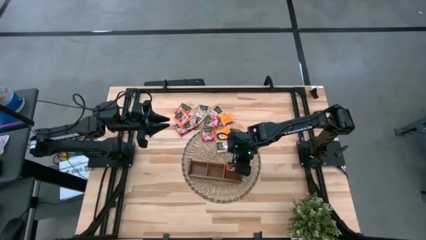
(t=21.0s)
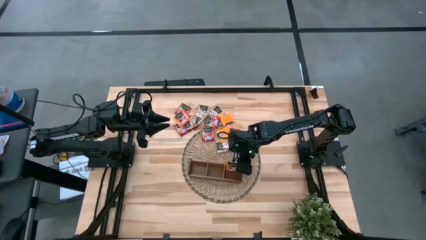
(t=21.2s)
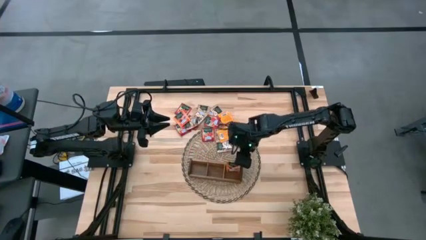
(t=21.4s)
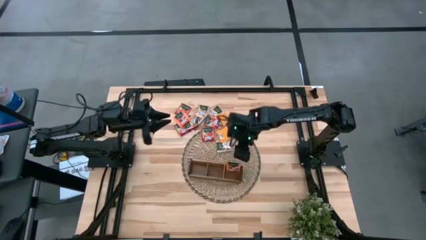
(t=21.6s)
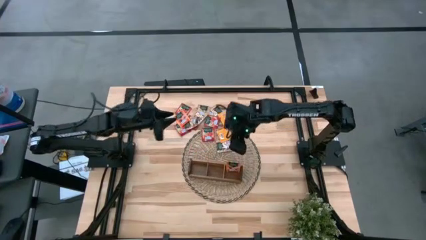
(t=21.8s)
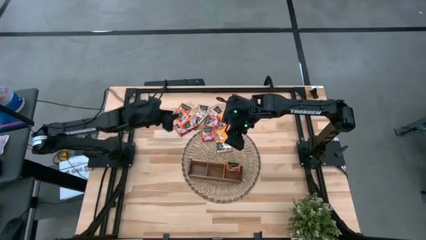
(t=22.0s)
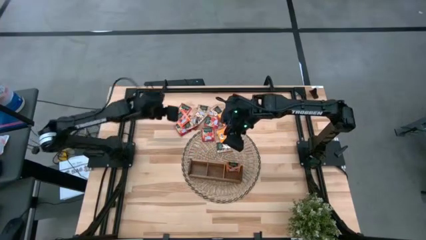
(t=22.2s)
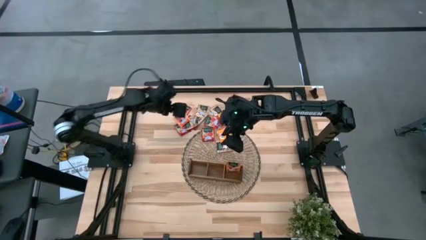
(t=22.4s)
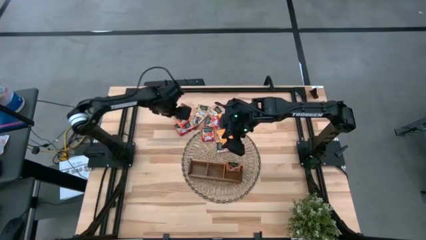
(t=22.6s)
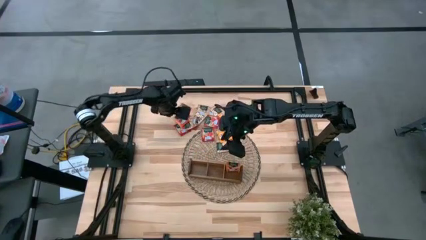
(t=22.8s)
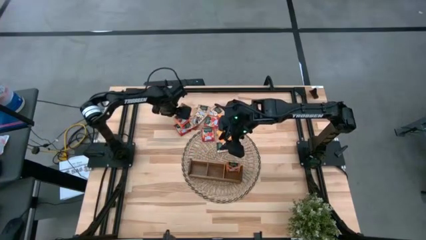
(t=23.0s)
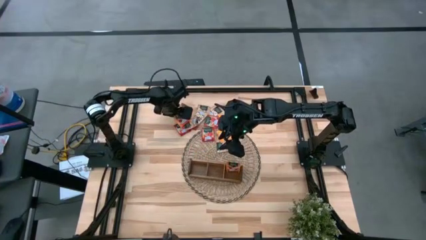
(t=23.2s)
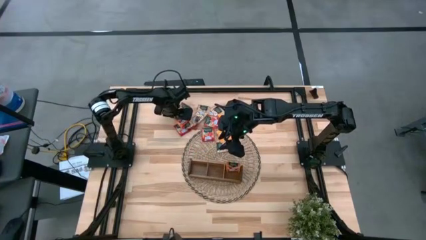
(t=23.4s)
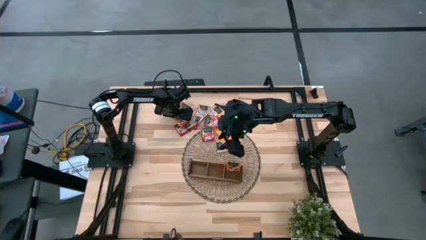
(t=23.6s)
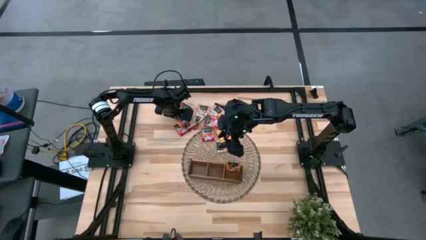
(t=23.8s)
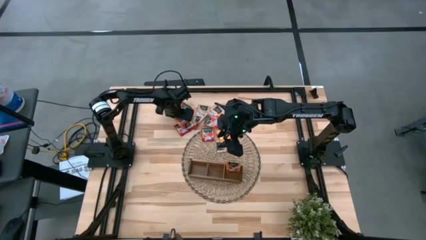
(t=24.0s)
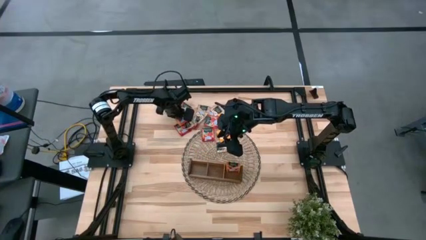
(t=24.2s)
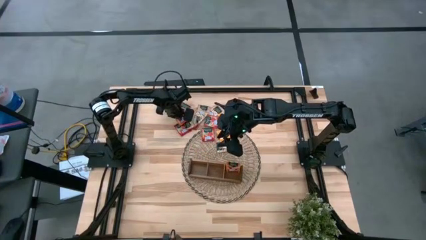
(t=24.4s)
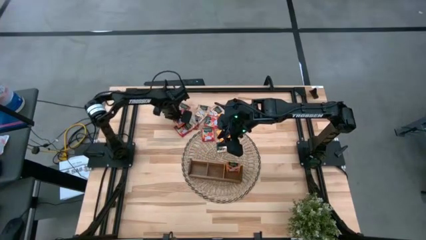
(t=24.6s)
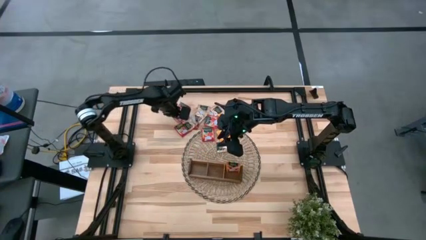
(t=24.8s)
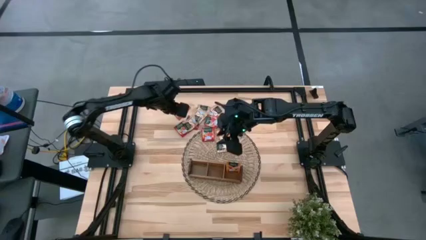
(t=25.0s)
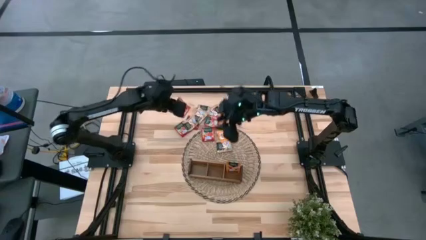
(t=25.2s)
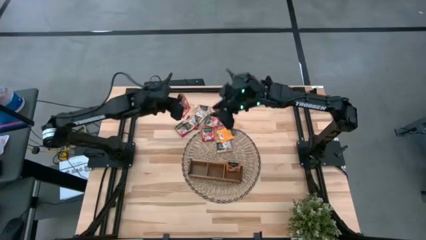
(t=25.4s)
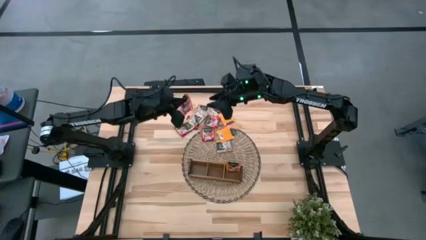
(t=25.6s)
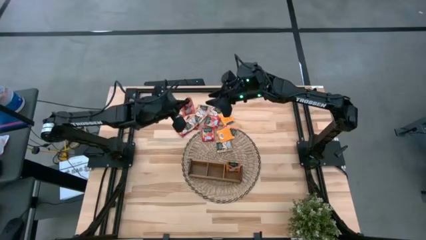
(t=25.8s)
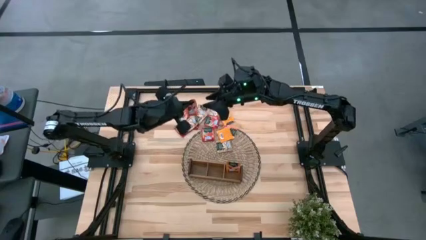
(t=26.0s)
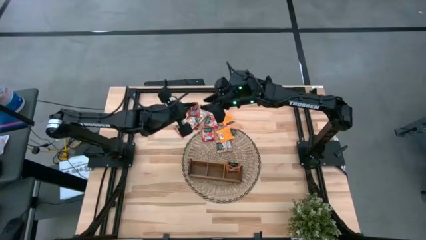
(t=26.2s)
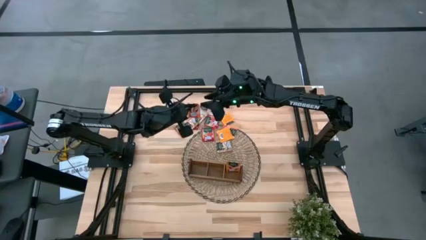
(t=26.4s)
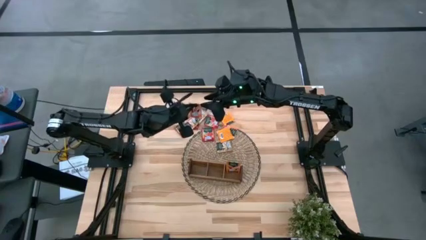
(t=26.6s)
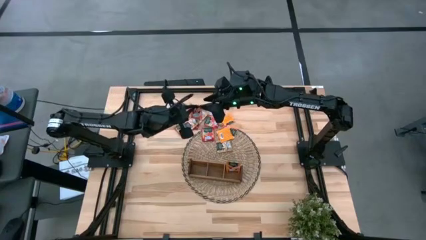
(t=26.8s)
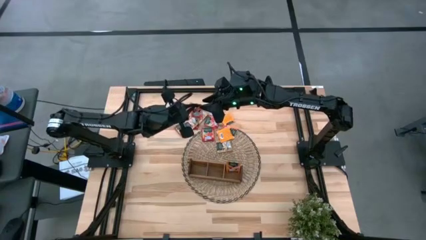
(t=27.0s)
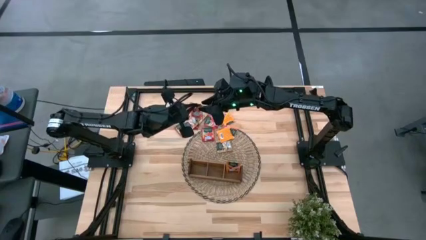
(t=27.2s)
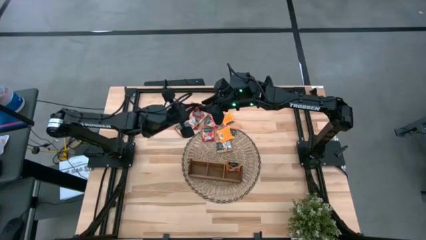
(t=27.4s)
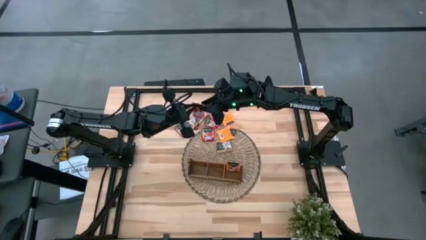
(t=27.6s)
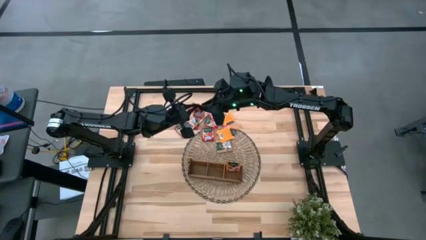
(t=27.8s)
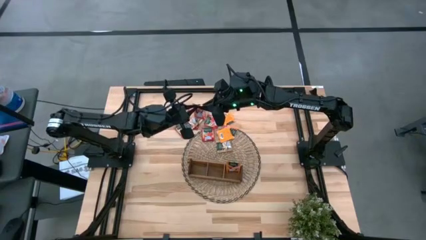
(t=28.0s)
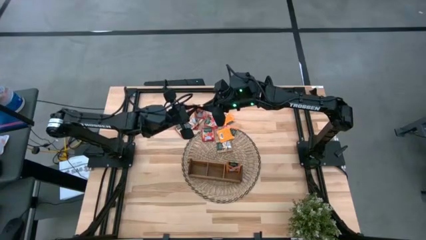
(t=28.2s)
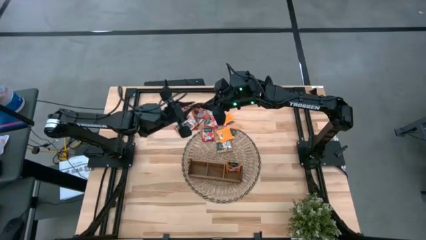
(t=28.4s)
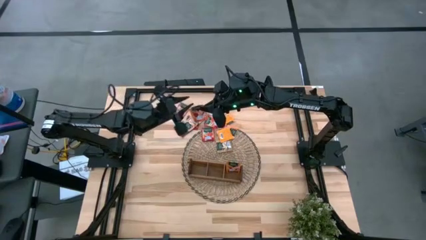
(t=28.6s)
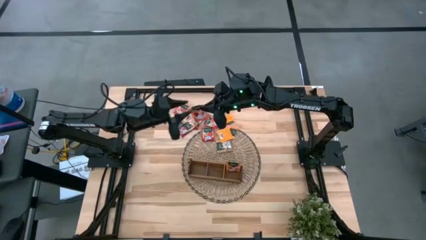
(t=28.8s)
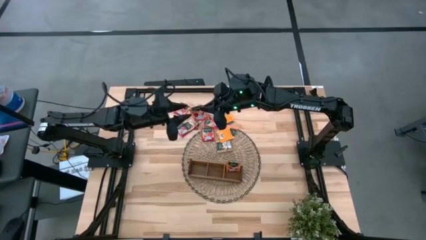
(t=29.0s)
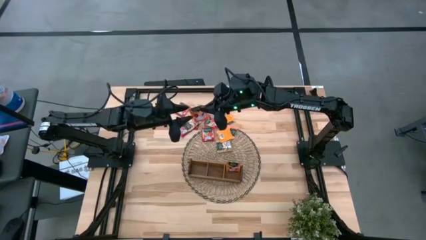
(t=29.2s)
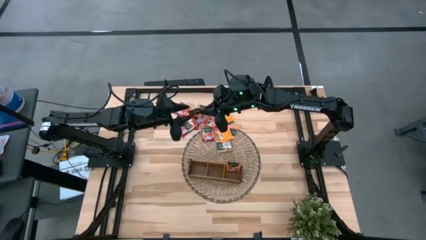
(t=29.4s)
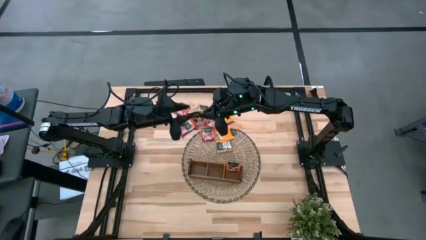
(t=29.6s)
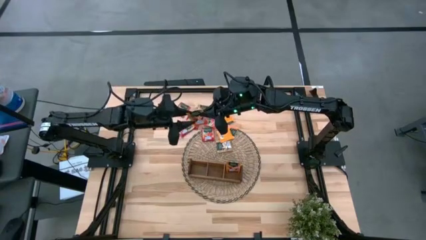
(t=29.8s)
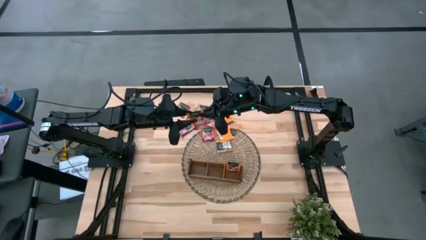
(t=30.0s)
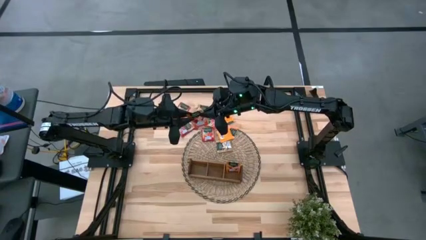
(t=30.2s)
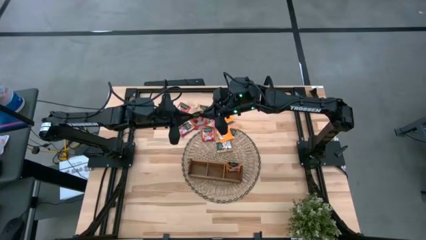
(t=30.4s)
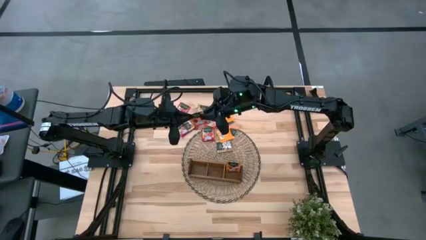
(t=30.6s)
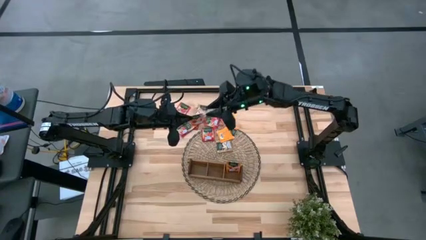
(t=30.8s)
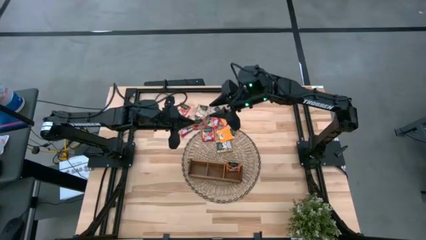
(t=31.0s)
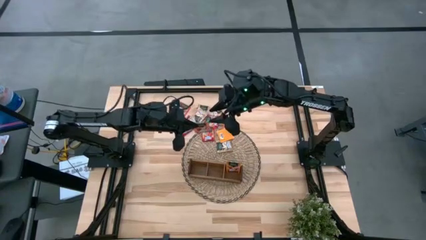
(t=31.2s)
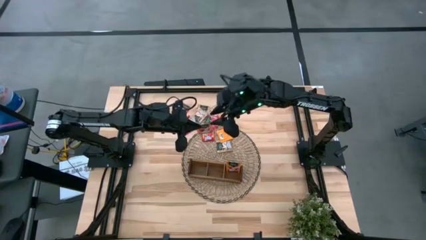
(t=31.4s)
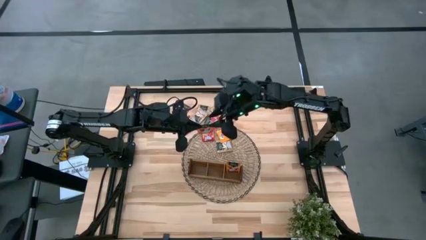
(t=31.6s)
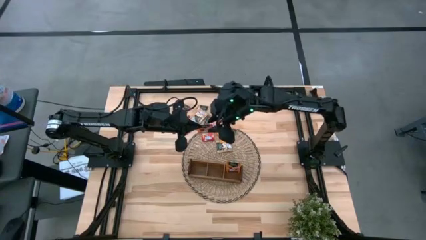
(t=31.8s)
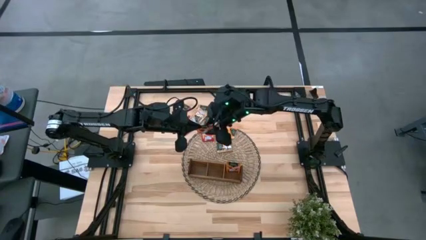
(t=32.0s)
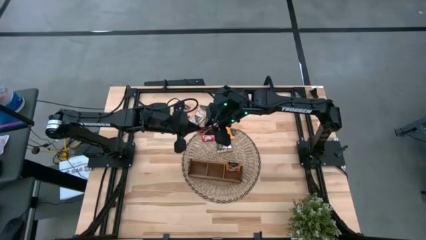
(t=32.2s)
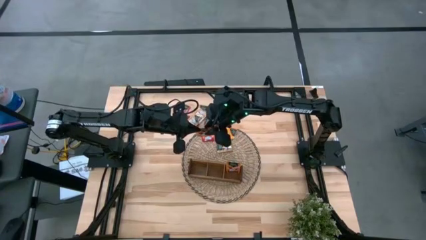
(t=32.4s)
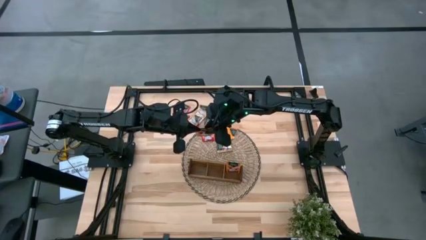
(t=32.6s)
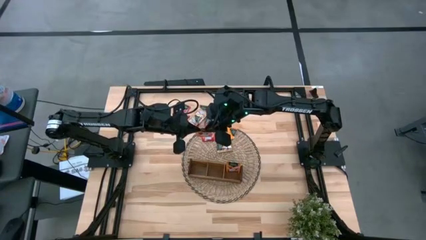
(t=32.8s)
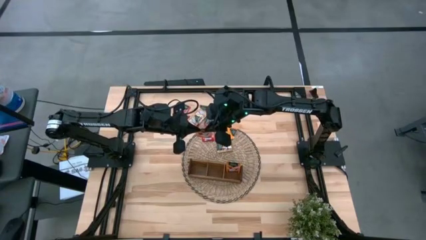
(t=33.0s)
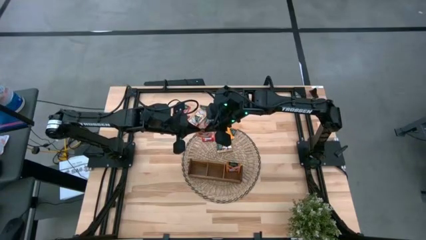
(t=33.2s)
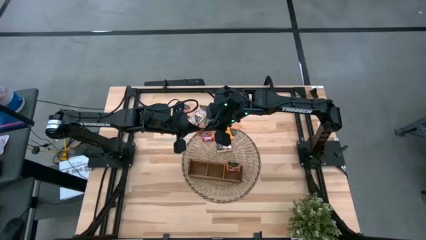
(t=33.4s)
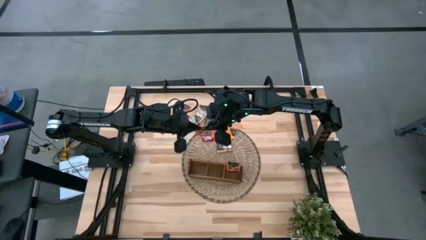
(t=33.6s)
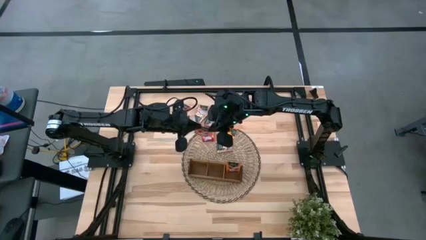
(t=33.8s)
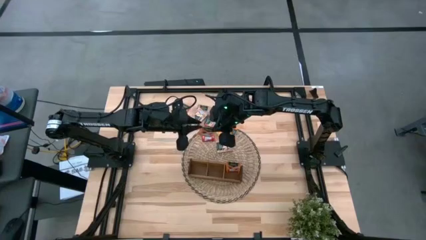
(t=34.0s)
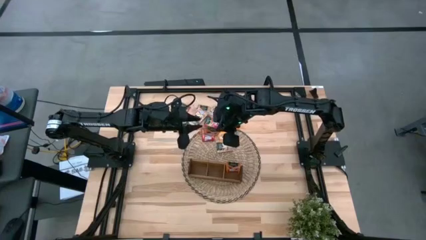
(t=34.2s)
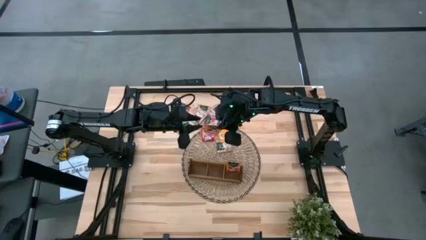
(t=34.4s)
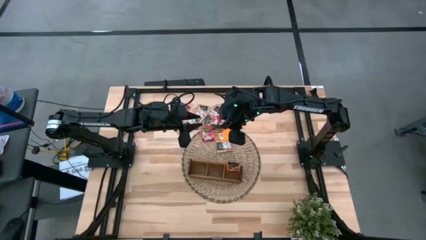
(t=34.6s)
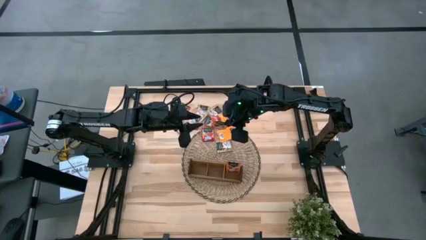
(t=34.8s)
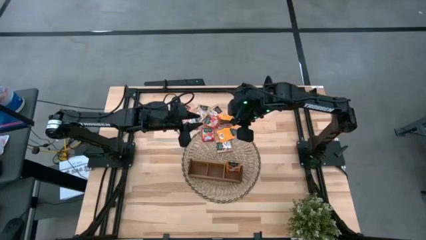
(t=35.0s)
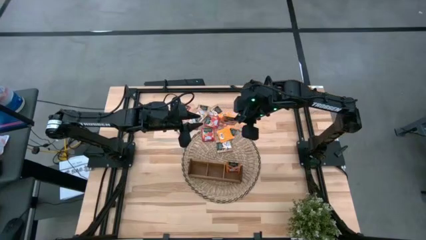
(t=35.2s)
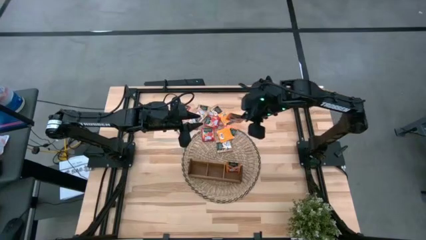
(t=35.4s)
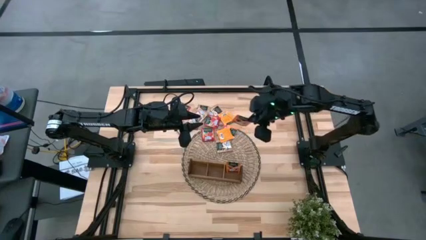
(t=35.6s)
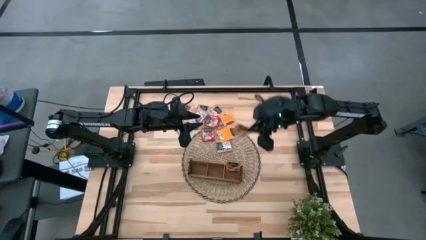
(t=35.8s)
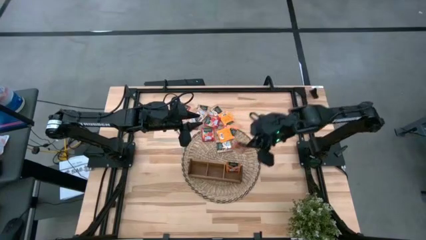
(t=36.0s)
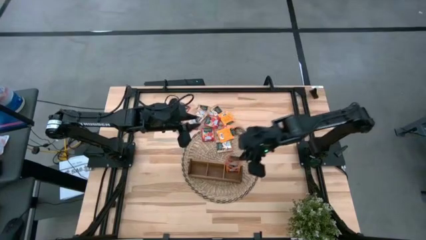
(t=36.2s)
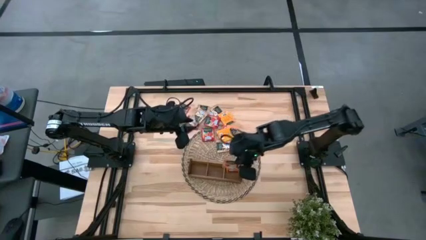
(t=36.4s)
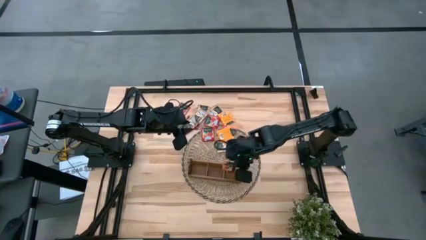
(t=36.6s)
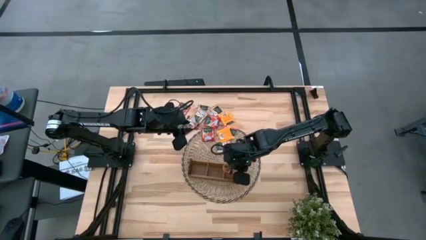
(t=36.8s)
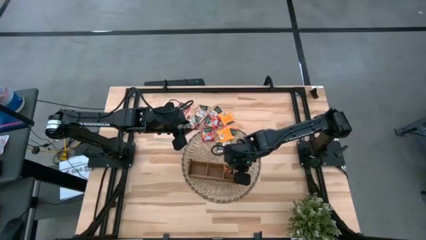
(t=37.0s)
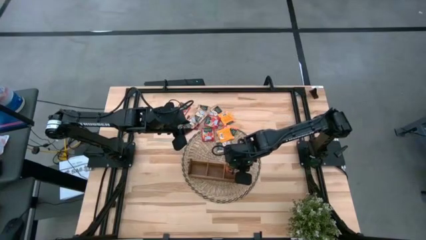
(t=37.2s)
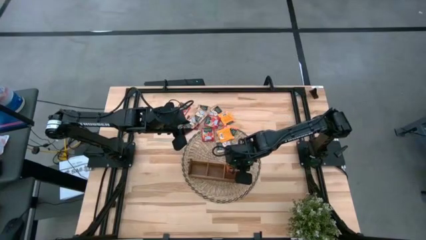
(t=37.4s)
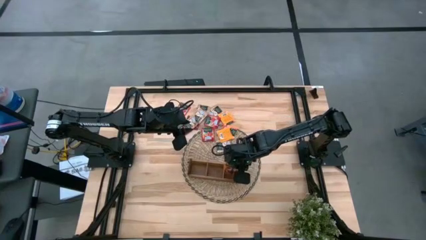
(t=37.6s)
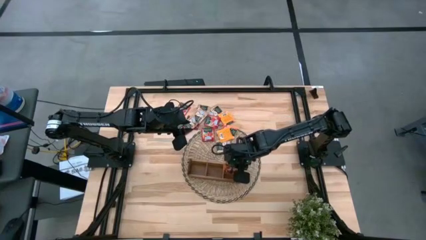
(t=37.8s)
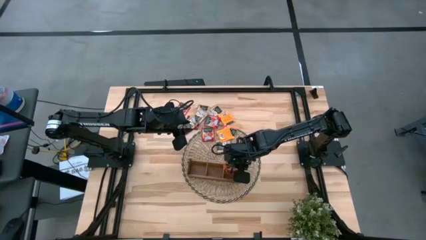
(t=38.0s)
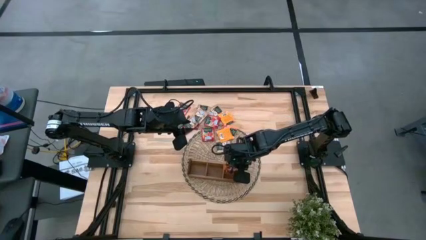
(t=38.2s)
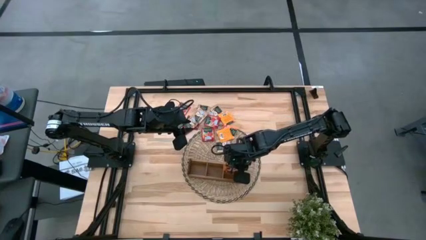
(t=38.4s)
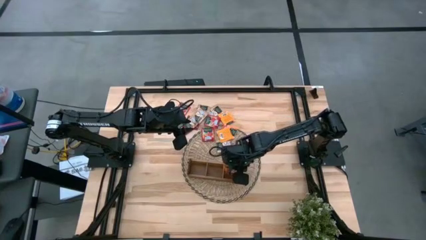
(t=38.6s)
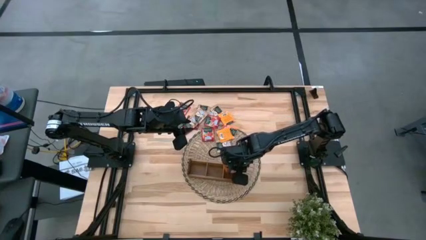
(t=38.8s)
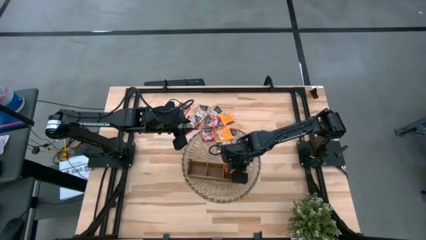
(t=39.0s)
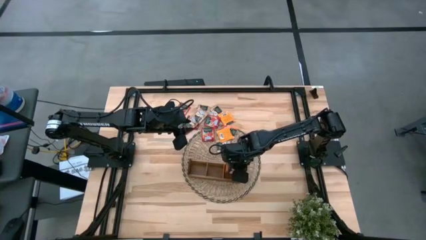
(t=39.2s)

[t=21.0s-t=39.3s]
Task: Pick & Place Tea
Put the orange tea bag into the right section of the wooden organizer
